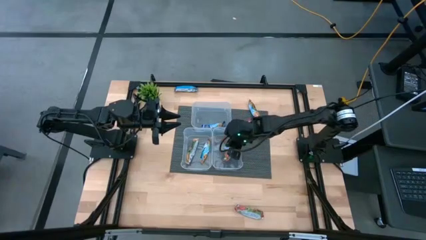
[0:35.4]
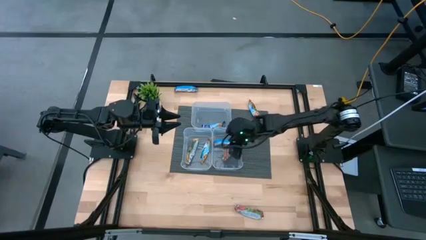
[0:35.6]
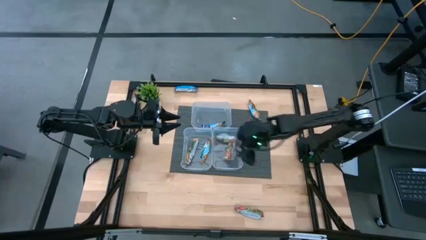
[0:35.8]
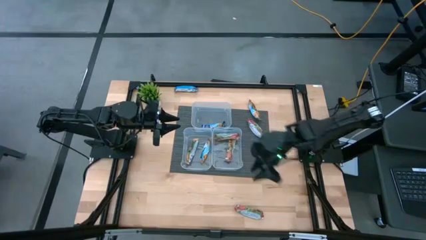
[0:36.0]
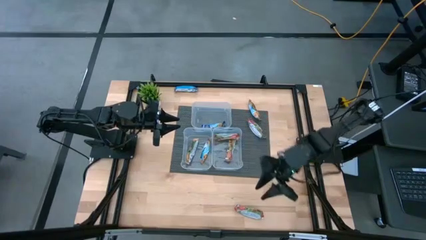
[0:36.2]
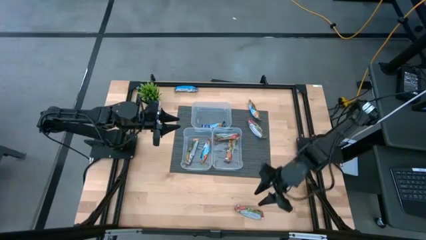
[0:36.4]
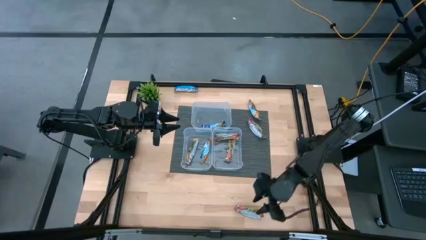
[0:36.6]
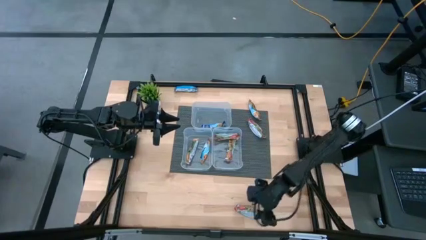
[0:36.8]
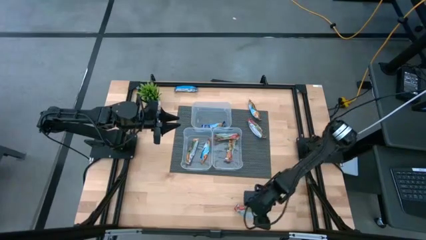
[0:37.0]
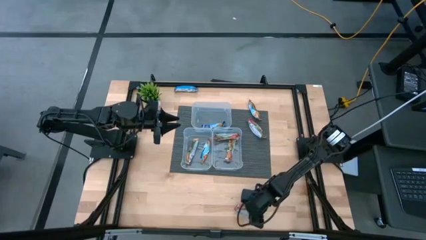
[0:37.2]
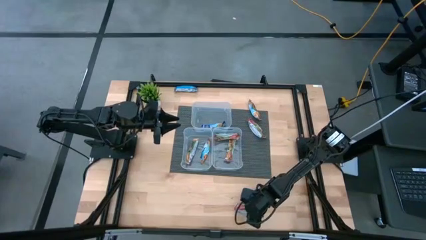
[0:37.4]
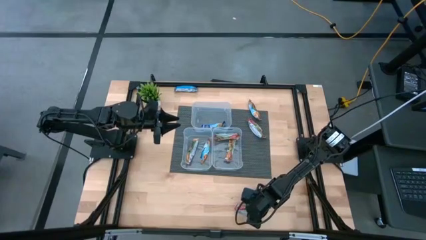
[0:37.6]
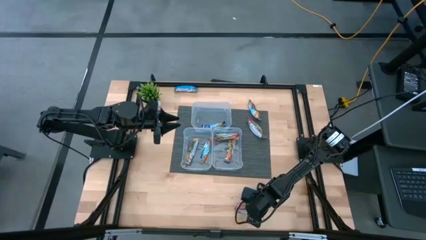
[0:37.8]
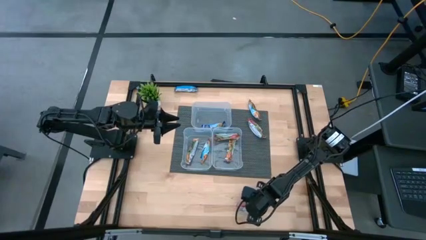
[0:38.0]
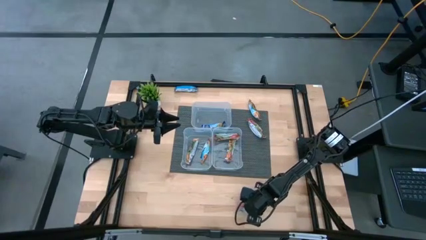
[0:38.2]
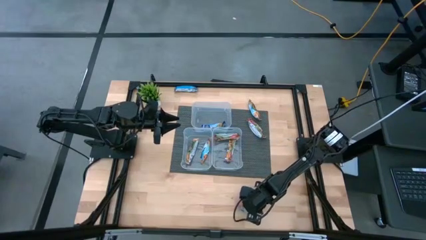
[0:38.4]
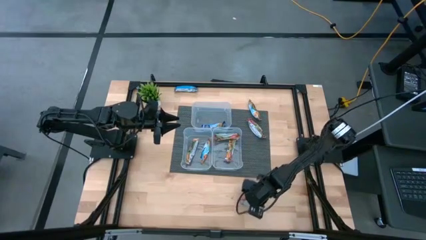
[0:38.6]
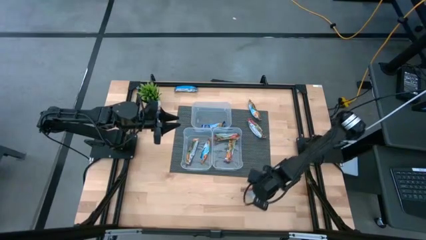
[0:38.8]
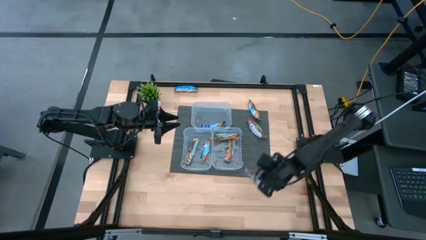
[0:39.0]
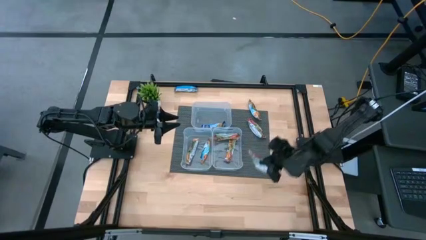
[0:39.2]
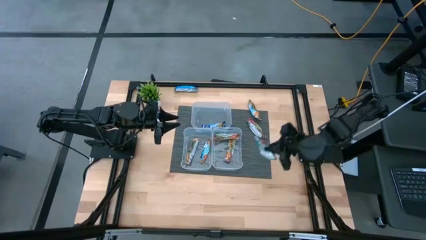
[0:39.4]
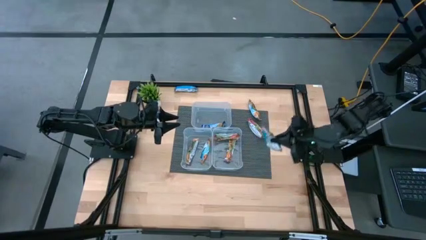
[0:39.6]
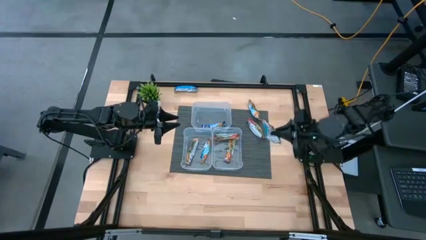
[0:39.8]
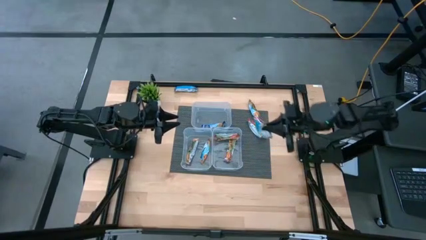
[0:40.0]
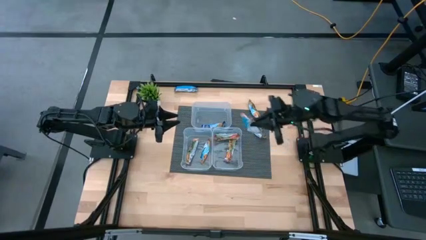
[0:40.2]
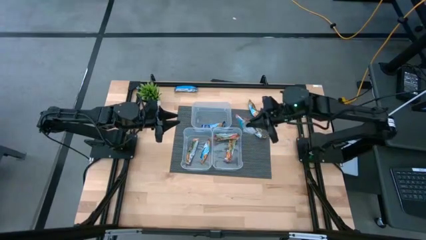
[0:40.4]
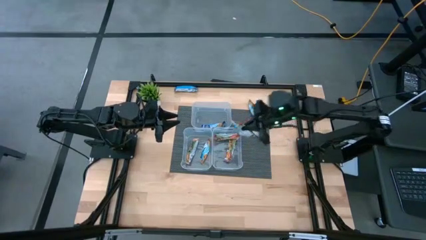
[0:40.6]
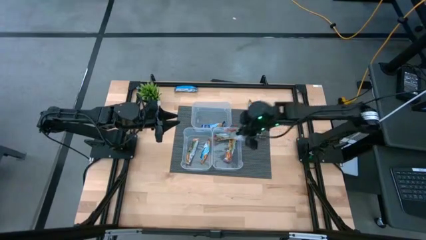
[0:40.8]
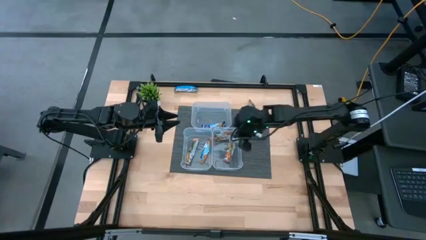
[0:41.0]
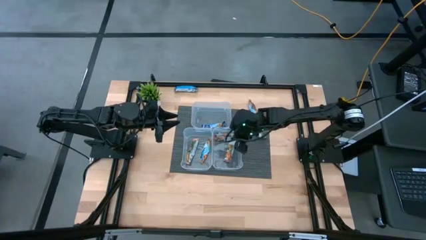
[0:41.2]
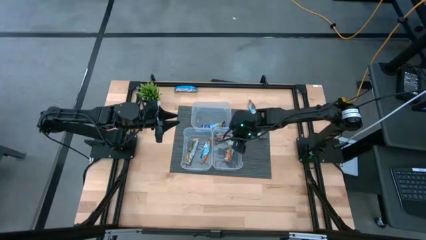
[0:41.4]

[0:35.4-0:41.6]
Task: Pick and place Granola Bars by type
Put the red granola bar into the bottom right transparent bin

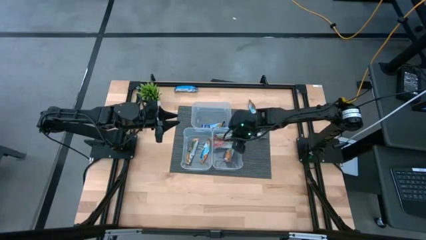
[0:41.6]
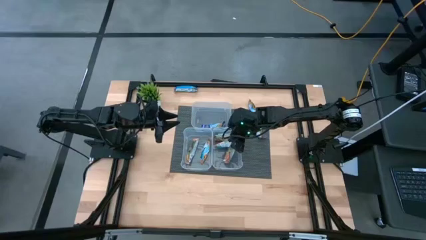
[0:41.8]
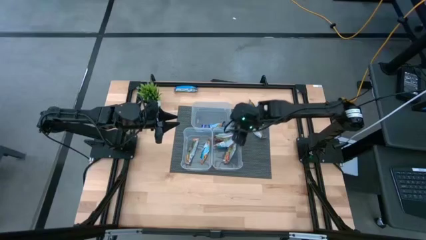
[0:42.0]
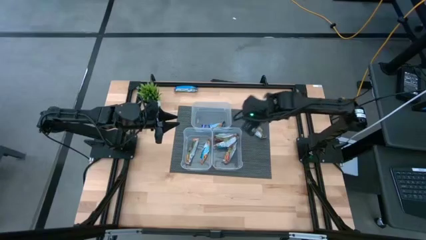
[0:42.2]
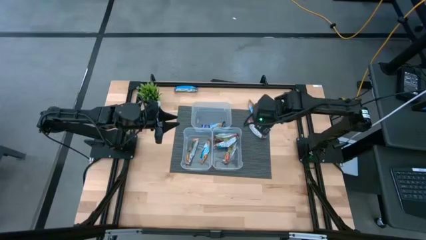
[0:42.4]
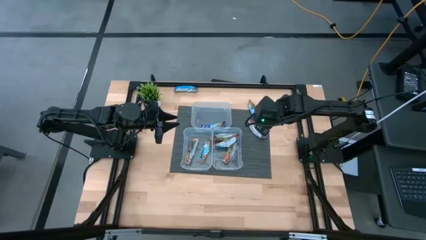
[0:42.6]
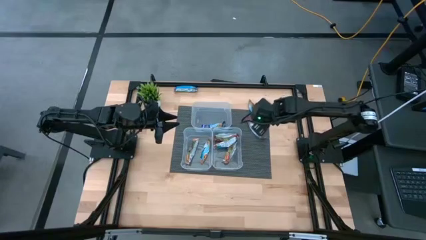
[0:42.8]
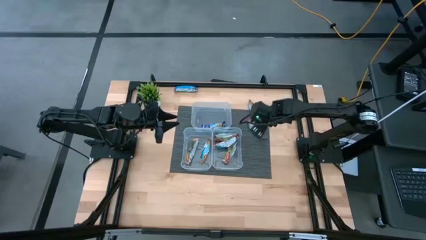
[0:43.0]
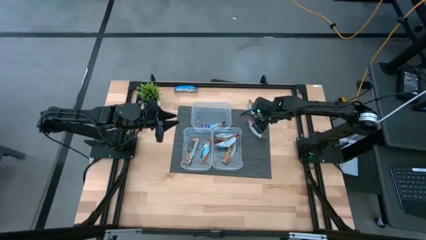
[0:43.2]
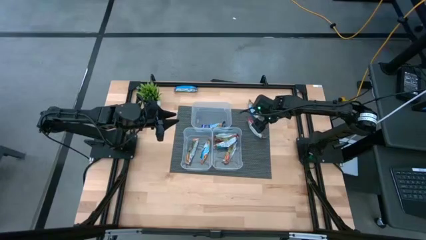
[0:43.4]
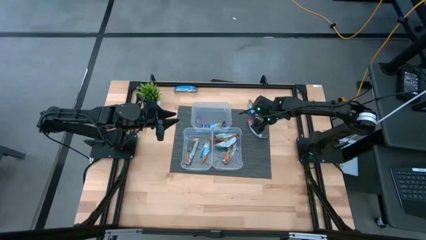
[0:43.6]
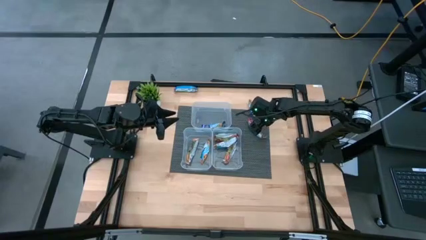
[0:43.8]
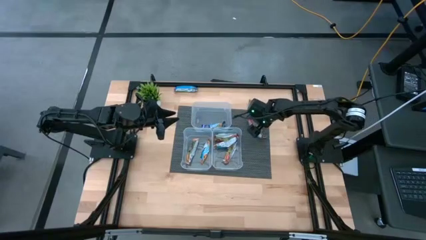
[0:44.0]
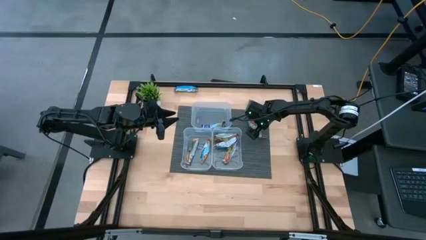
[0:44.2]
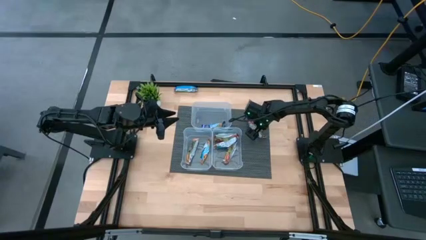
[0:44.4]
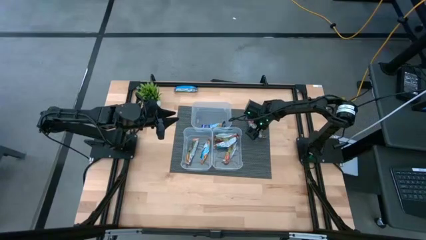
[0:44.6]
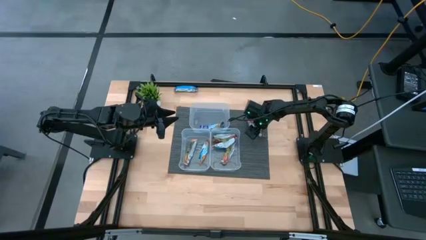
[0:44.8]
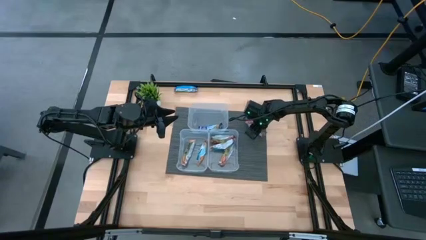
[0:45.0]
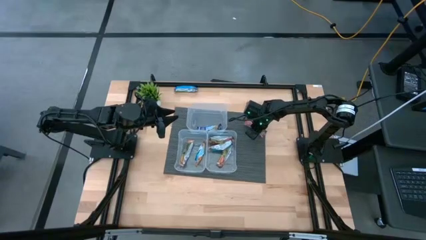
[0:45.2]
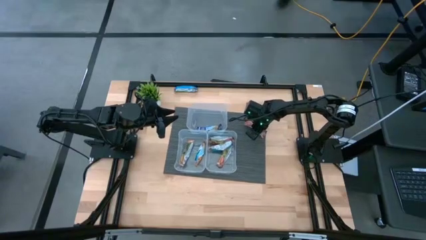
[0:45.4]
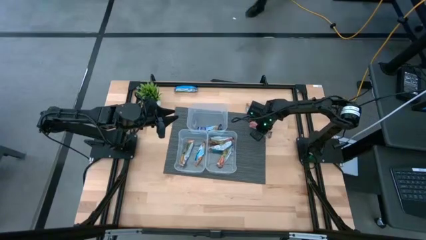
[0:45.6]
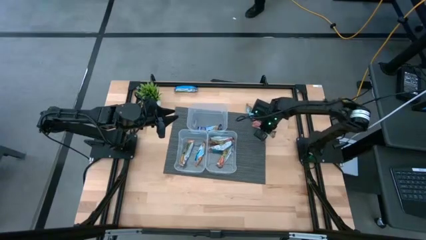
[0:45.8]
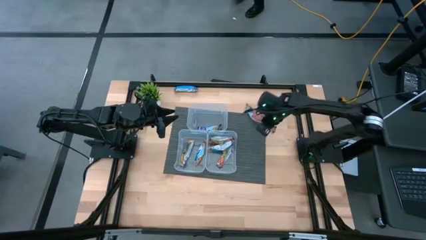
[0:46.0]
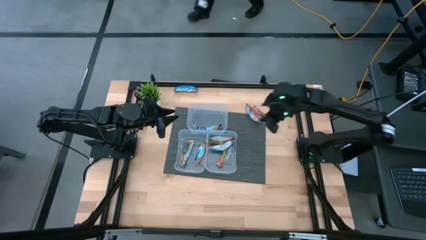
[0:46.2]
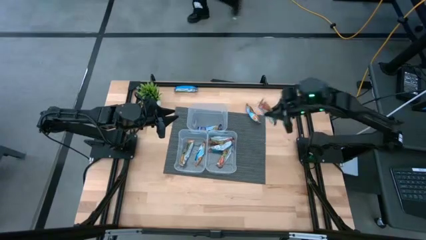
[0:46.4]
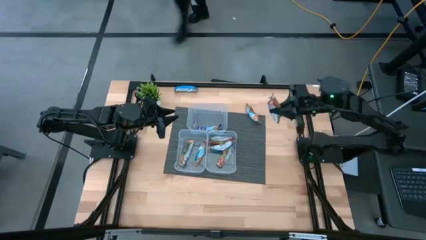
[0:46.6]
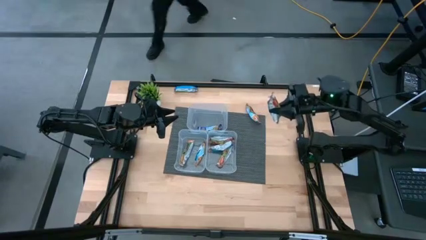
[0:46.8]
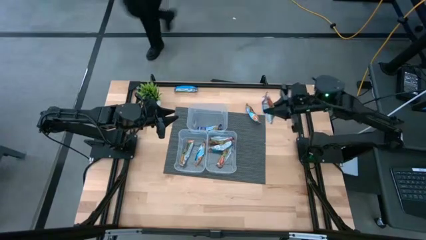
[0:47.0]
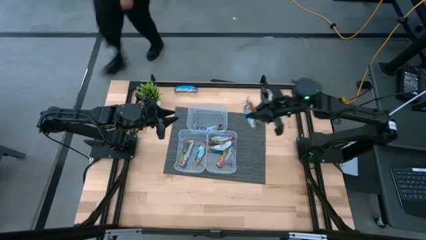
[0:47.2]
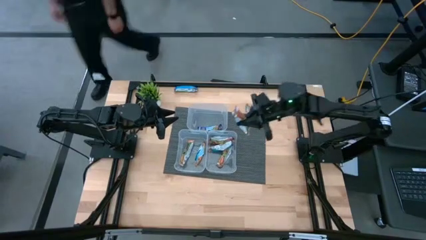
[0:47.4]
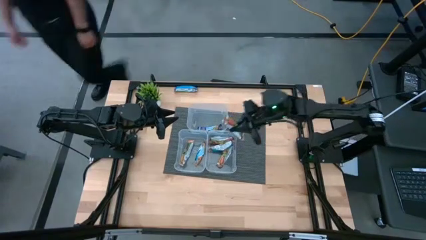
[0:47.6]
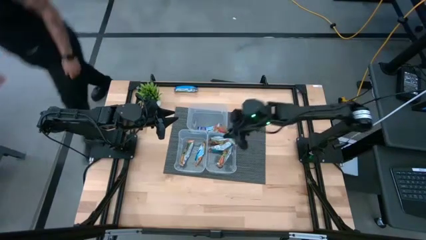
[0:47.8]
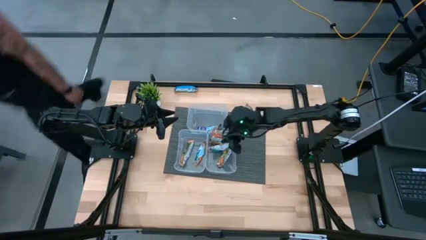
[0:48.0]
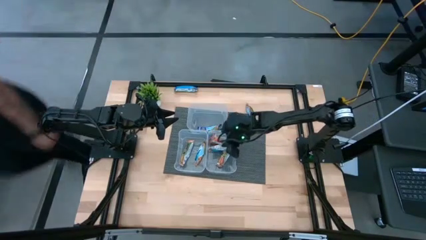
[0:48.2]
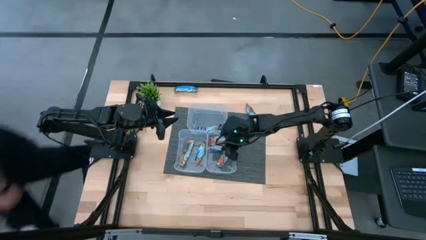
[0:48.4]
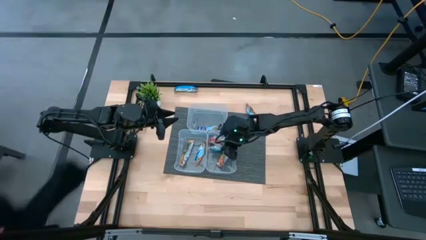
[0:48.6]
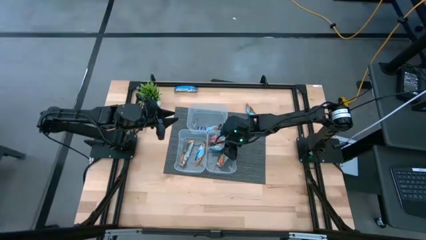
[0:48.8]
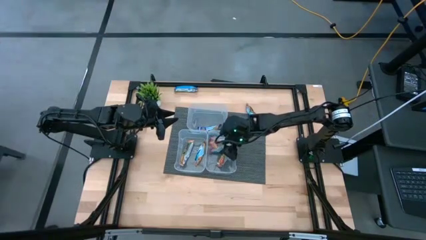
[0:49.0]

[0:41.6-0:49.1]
Put the red granola bar into the bottom right transparent bin

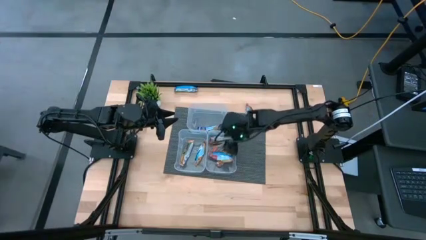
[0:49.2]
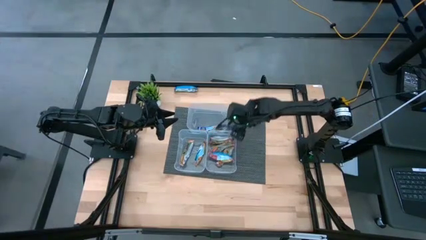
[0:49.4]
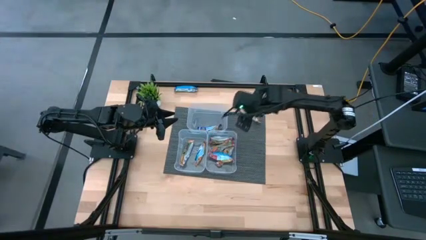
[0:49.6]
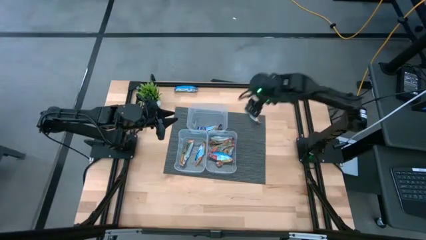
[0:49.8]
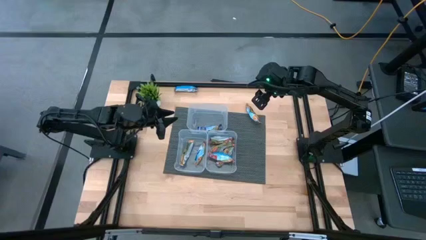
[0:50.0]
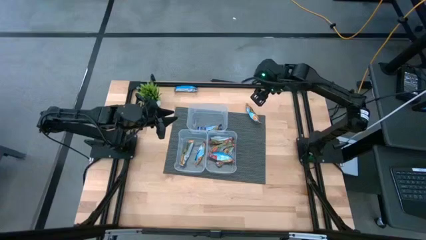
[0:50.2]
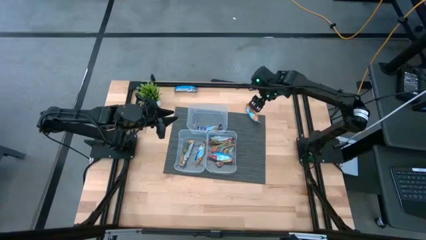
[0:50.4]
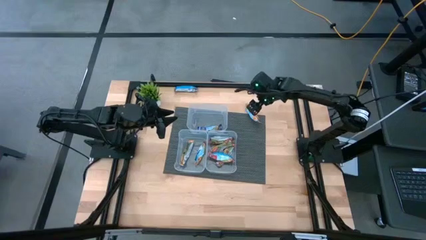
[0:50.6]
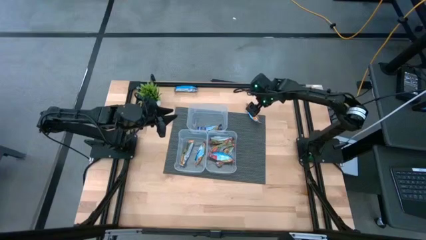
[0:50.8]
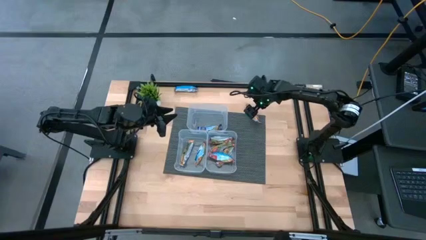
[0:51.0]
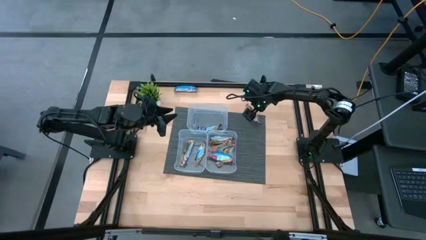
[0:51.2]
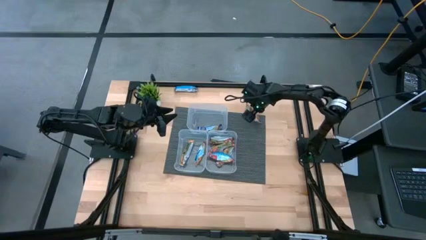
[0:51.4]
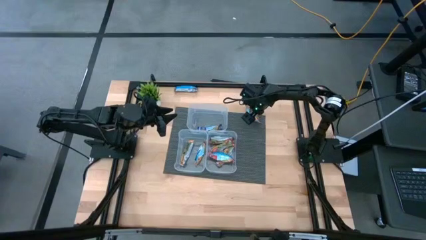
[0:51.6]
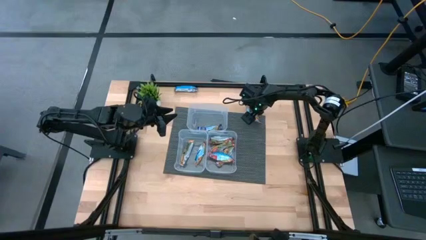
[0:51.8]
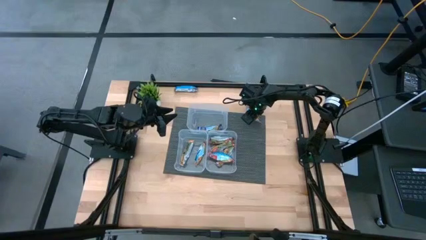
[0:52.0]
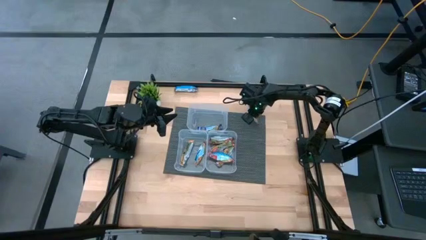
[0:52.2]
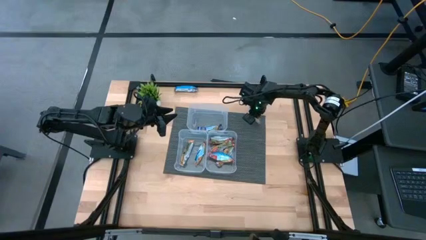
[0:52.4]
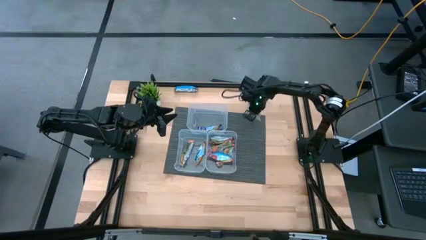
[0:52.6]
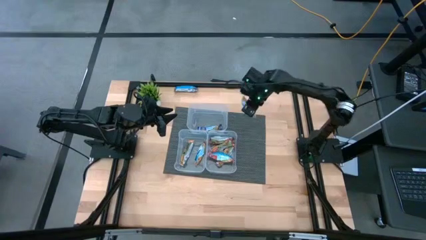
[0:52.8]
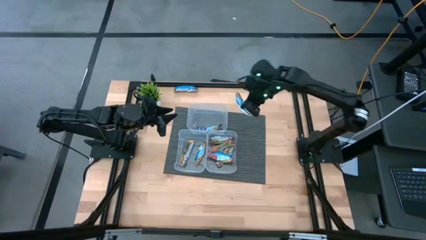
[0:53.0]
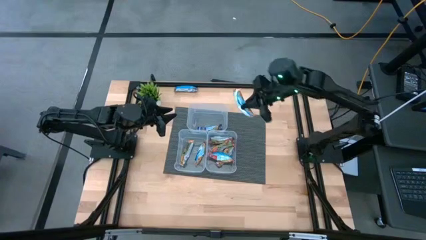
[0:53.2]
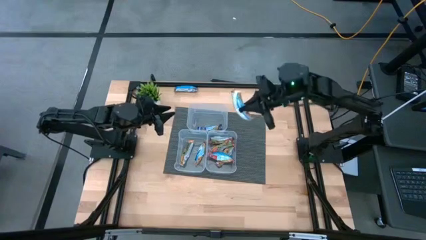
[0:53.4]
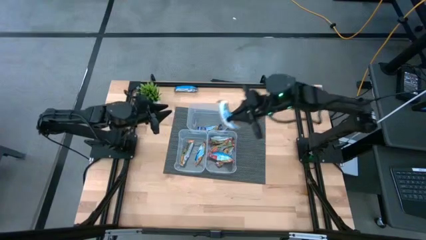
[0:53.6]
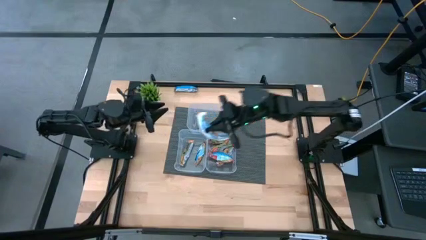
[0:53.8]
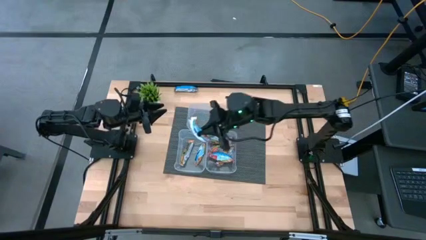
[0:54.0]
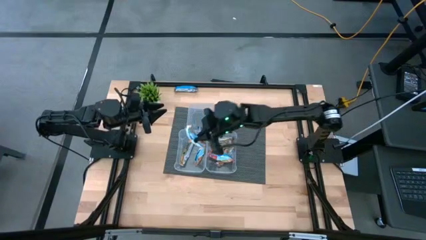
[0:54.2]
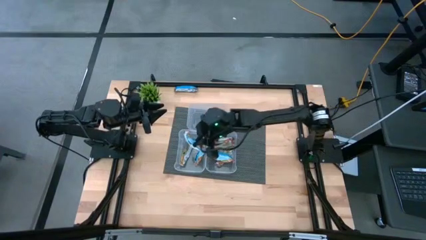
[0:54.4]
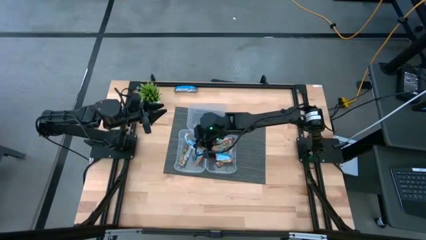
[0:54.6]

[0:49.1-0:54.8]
Put the yellow granola bar into the bottom left transparent bin
